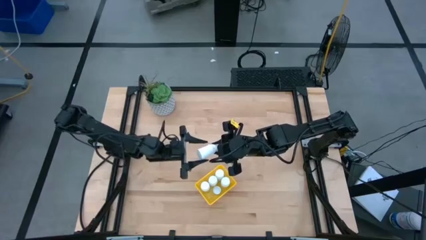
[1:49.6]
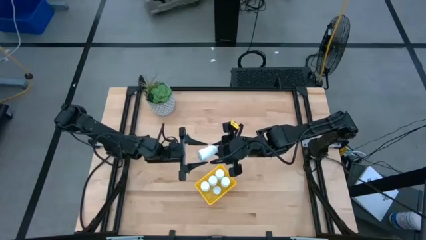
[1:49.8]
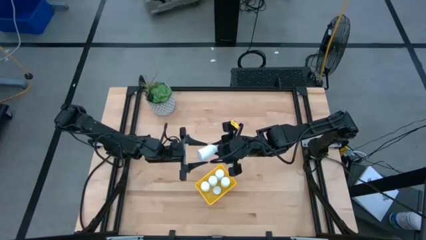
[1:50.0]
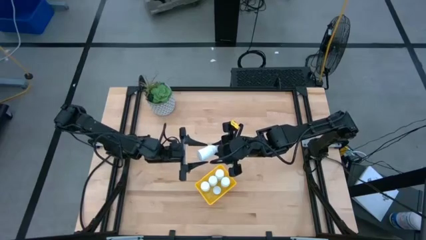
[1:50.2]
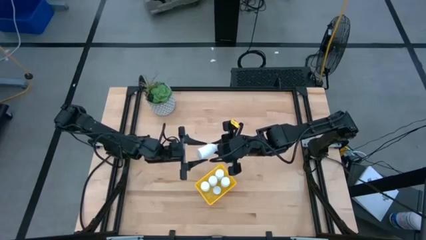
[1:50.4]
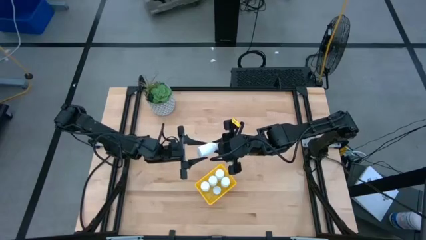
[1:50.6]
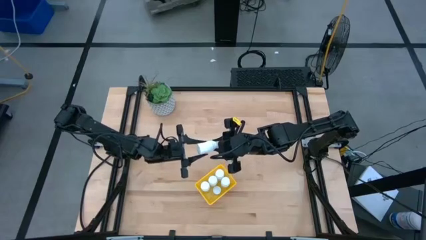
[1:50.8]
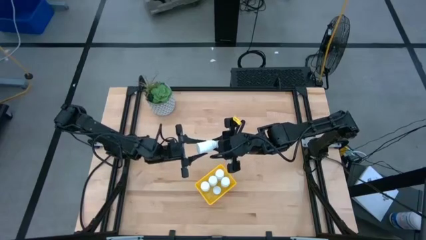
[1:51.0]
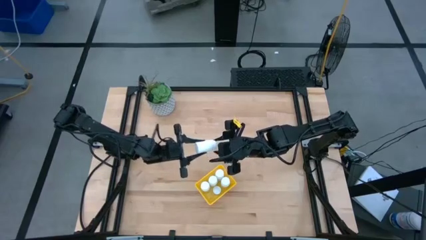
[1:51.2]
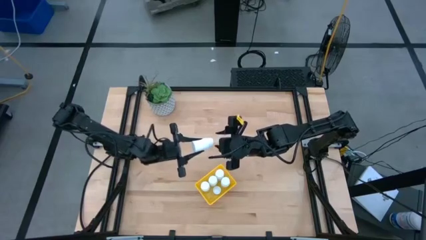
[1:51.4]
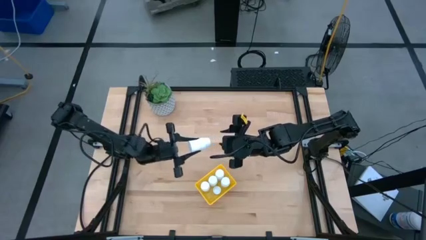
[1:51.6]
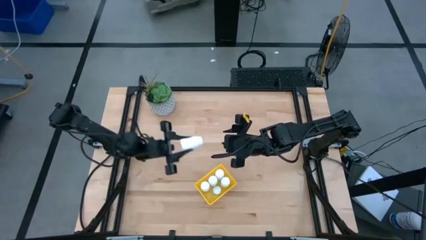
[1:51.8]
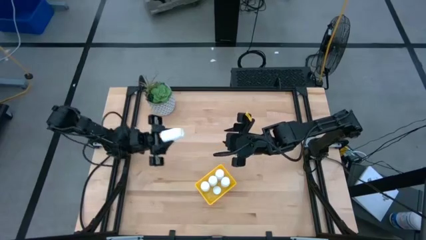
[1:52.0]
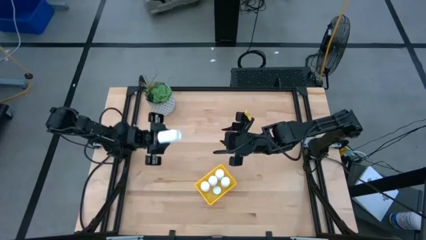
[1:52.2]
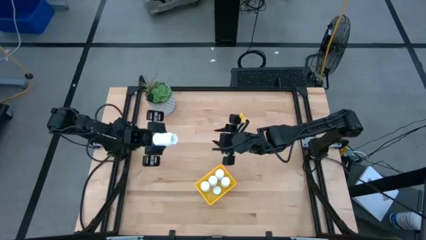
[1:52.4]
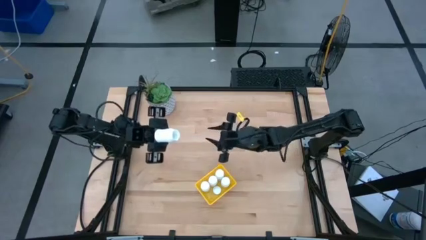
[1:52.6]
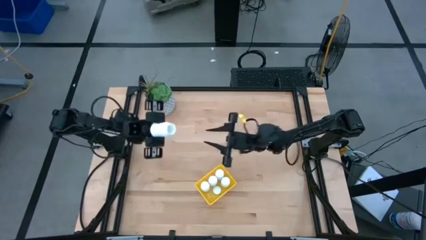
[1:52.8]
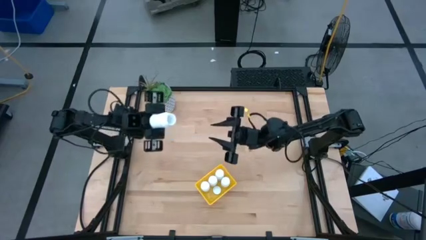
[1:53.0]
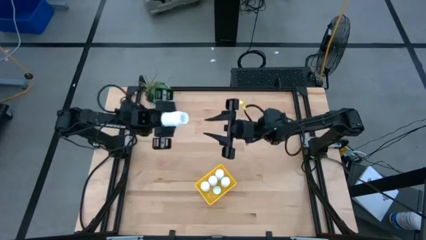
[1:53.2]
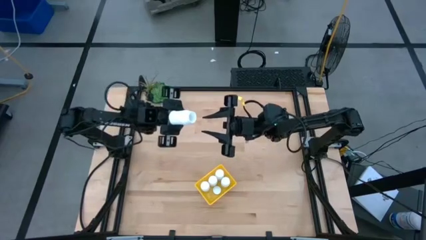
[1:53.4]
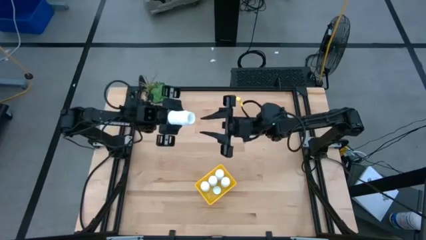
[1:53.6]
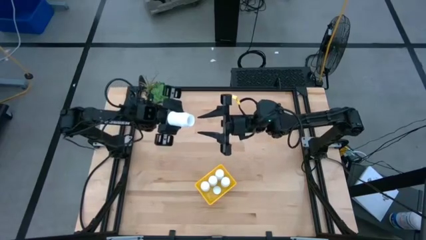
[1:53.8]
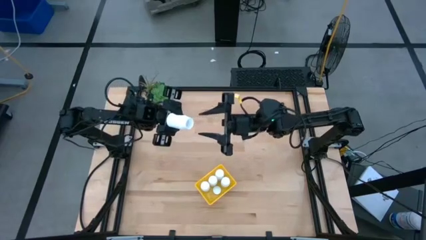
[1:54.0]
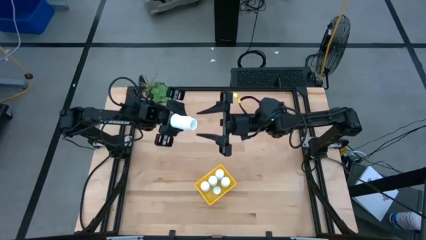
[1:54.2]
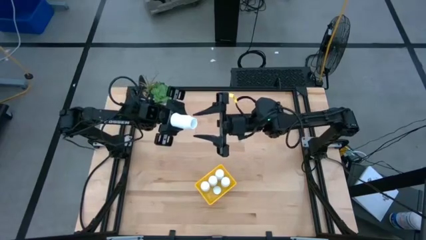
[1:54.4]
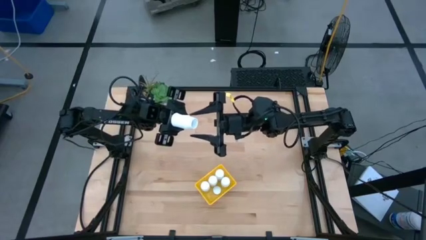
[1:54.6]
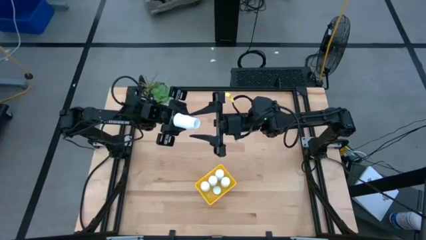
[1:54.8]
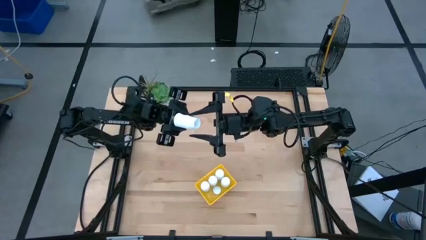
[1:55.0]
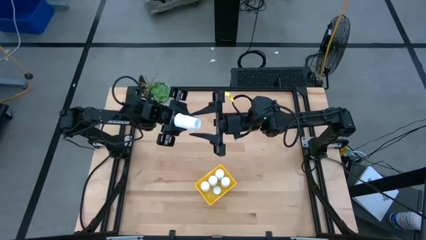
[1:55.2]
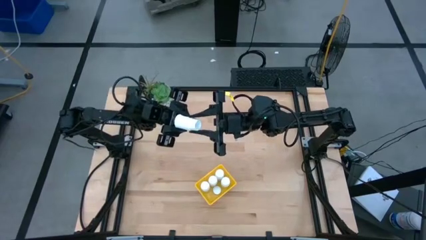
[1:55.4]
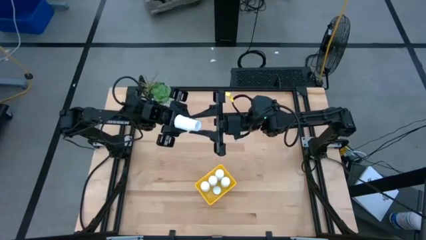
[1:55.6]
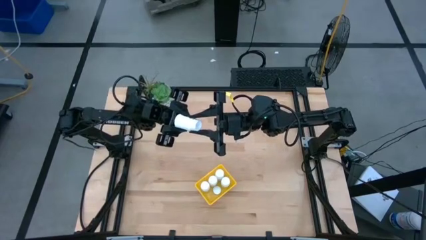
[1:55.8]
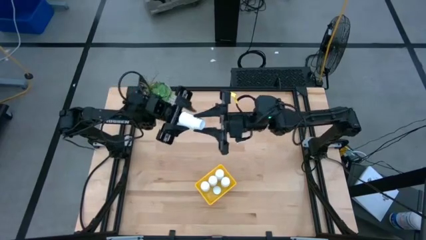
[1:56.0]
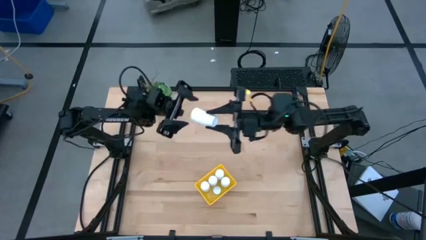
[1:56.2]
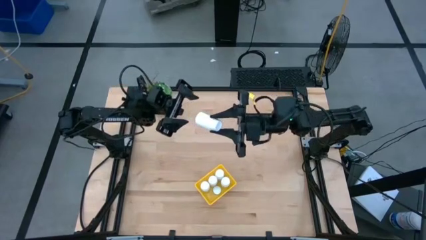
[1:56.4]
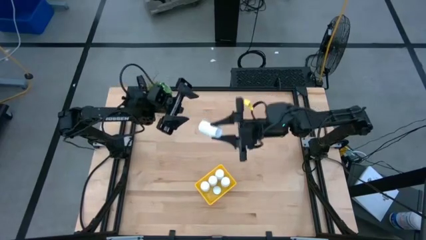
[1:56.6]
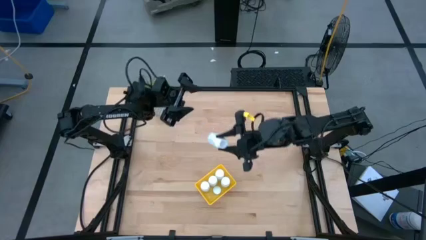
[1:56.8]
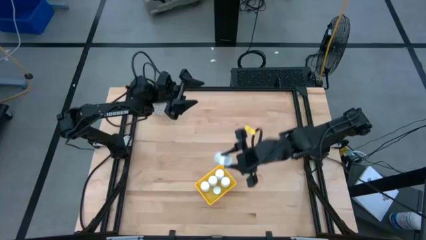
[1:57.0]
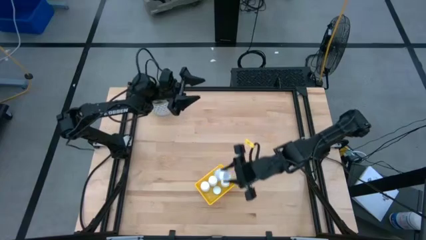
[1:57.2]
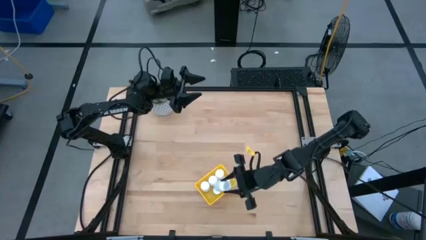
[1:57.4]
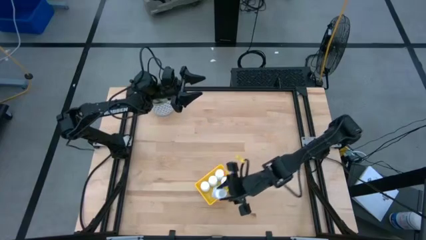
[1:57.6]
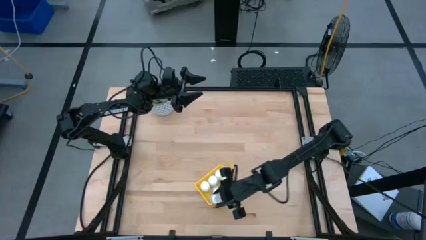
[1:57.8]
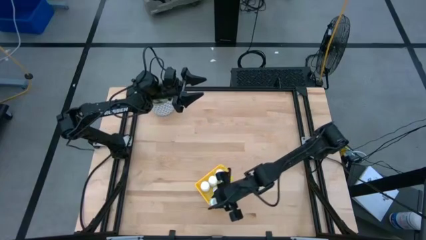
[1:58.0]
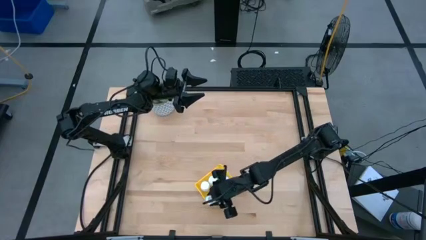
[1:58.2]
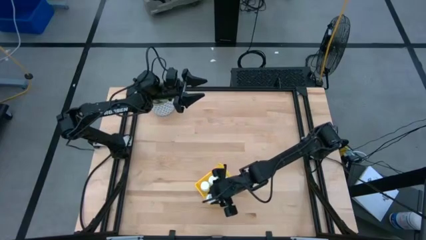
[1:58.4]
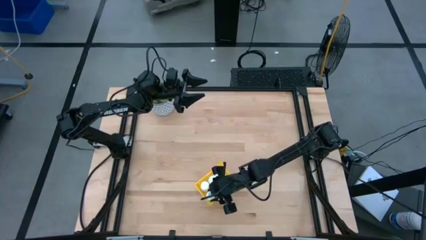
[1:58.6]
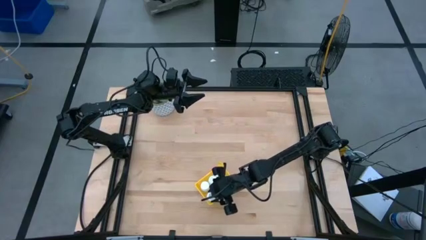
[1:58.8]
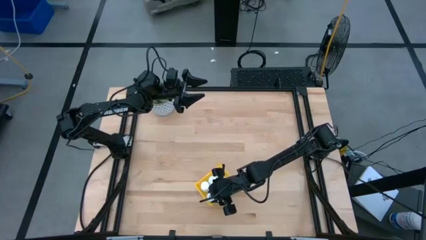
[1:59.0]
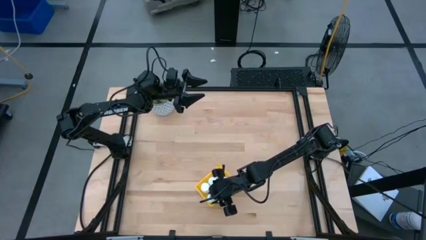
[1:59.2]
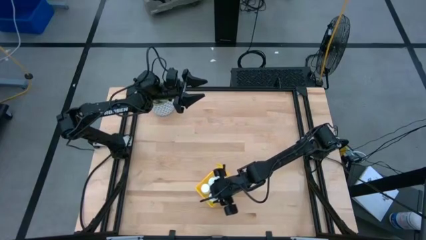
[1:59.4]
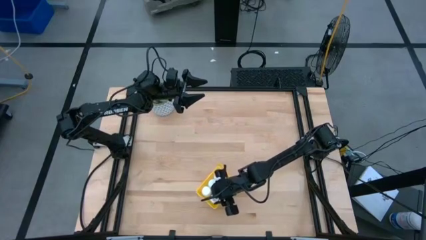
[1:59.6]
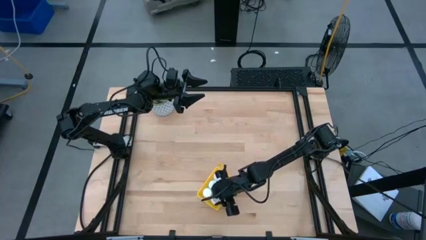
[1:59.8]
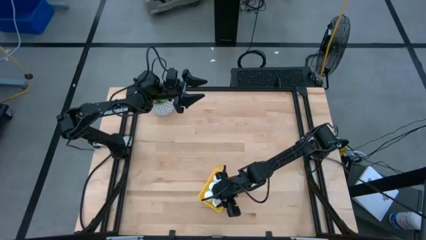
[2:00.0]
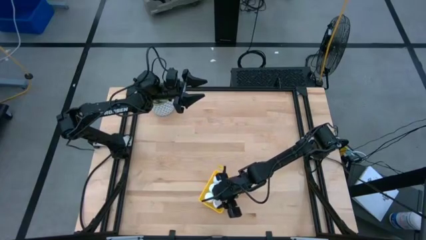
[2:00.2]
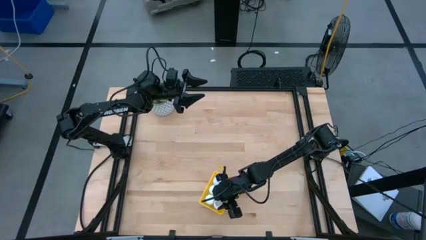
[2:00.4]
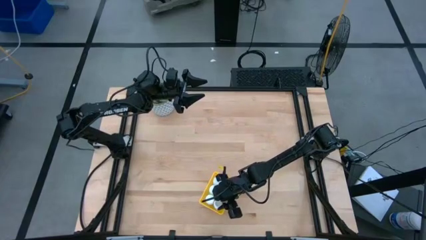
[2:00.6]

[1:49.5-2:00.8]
Task: Pick and place pill bottles into a basket
Adjust the white medicine bottle in the yellow bin

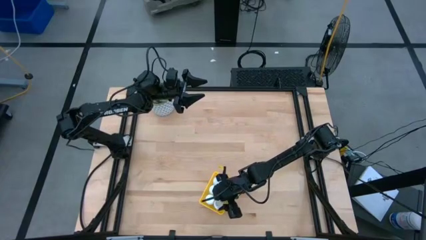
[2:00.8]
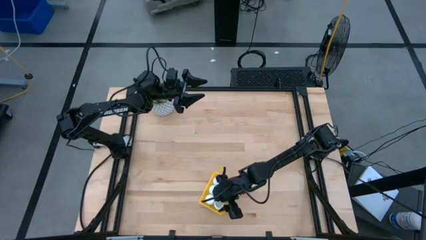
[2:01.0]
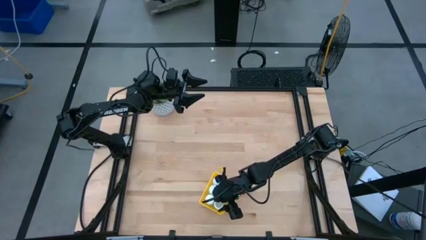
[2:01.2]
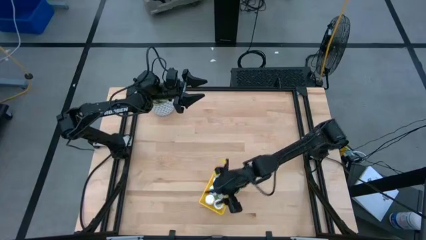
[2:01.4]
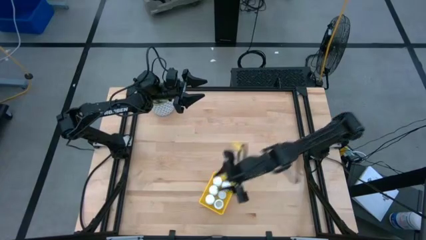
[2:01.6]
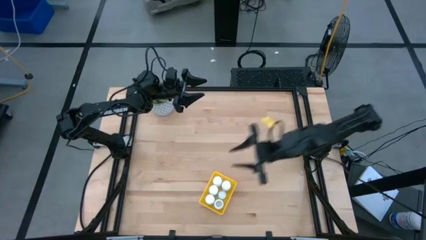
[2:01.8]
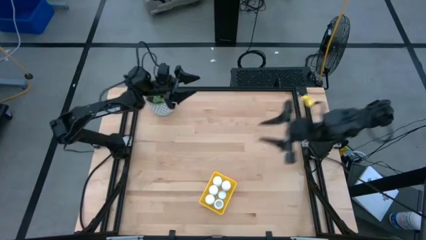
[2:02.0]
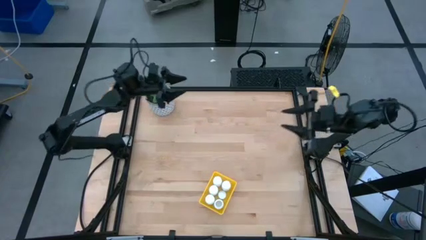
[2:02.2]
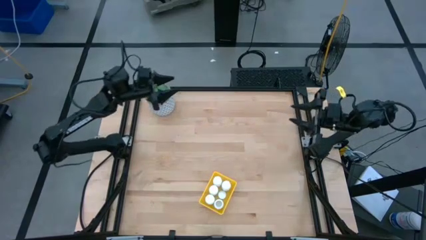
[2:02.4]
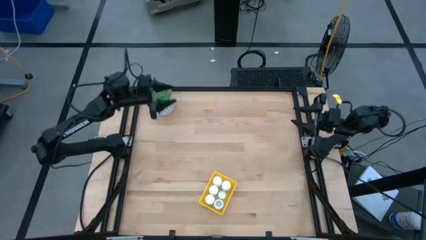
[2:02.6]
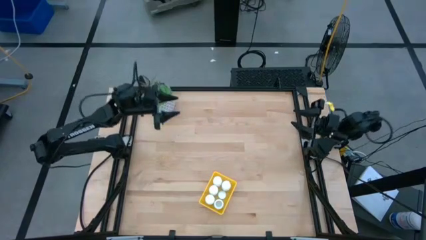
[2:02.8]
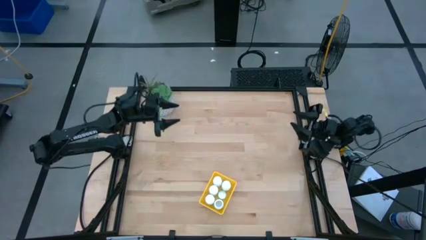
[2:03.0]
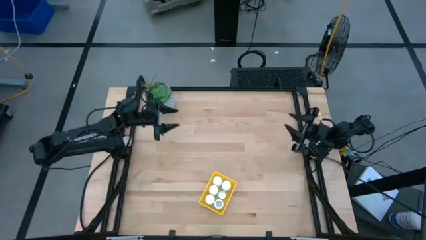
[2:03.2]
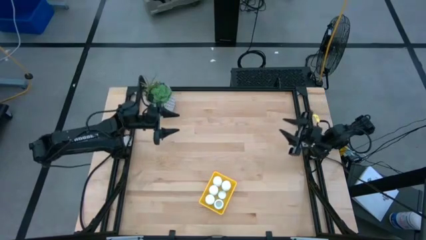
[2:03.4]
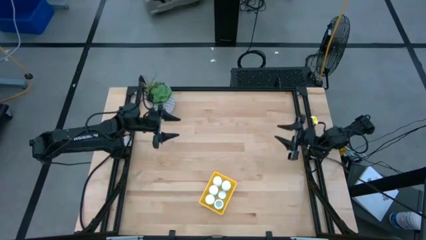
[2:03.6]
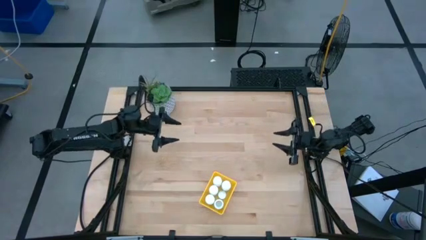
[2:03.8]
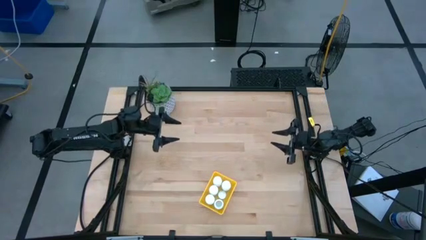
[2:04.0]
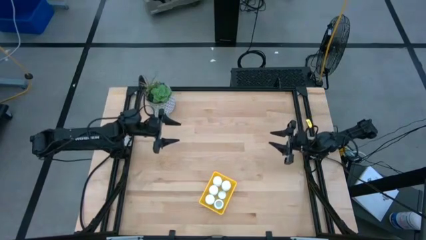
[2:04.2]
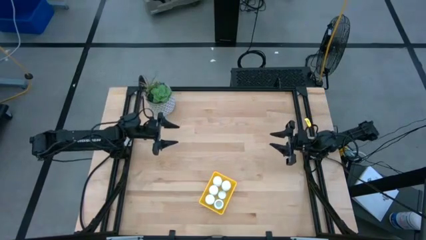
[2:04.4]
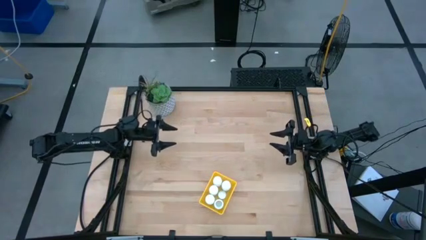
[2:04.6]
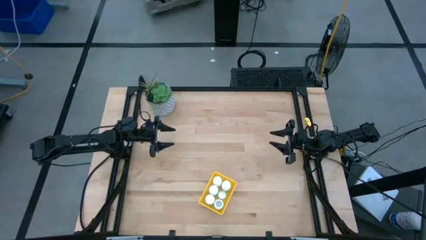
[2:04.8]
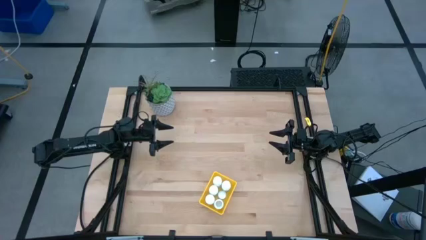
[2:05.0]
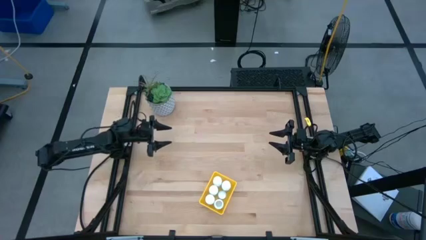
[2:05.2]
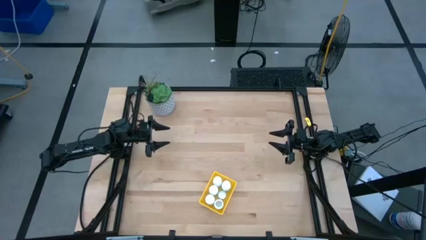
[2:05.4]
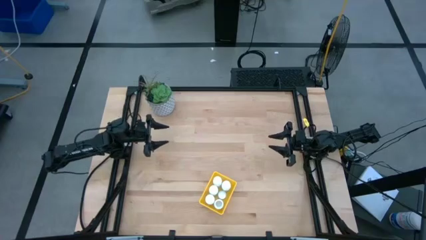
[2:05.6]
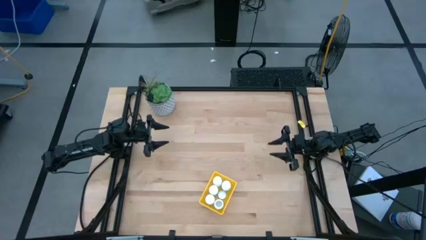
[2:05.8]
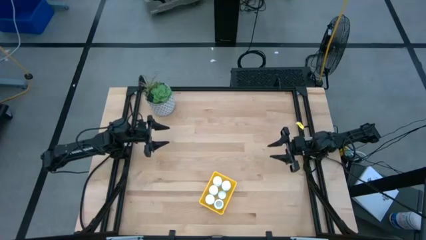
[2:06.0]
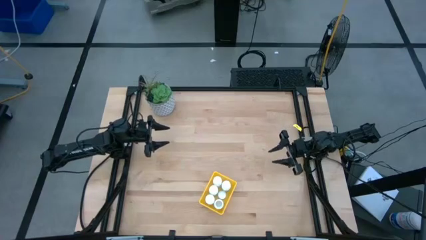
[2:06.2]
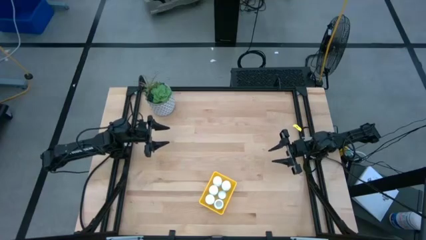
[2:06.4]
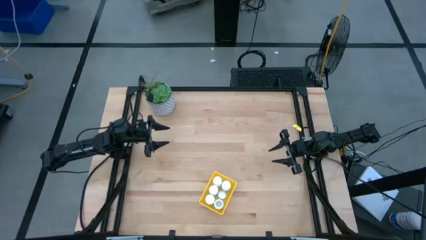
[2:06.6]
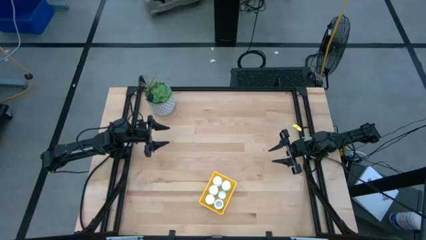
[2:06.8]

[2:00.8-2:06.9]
Return to Home Position
